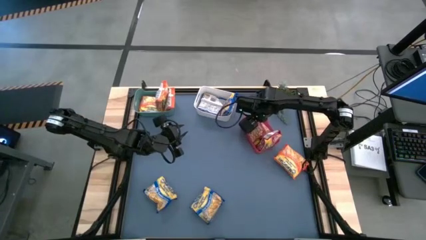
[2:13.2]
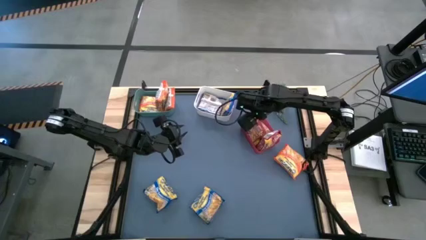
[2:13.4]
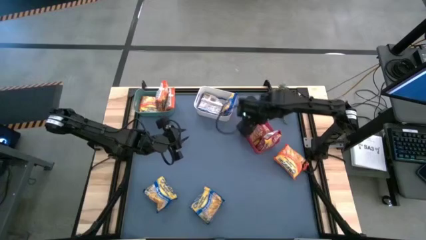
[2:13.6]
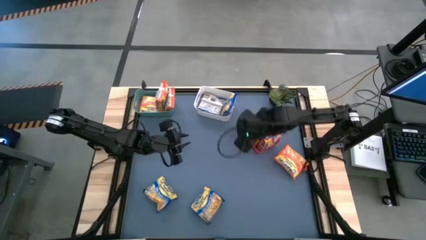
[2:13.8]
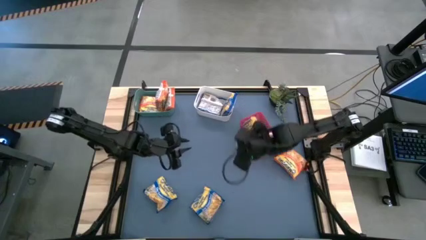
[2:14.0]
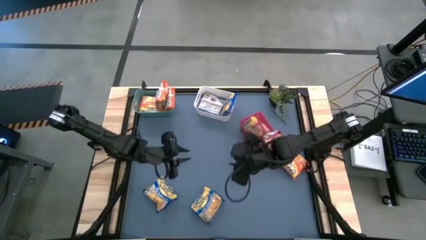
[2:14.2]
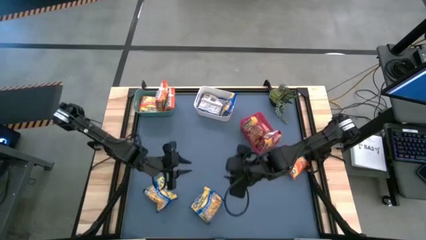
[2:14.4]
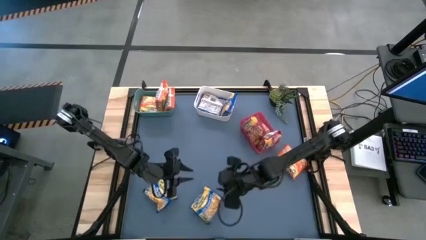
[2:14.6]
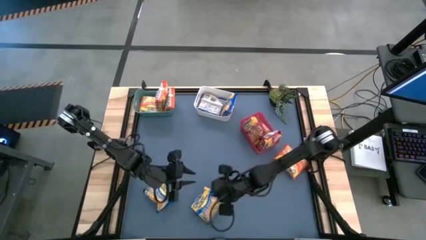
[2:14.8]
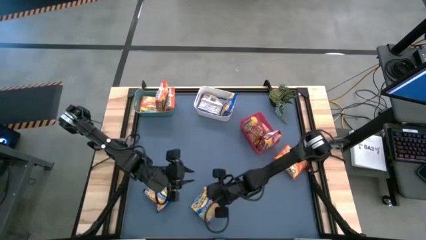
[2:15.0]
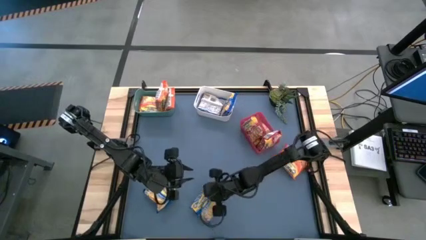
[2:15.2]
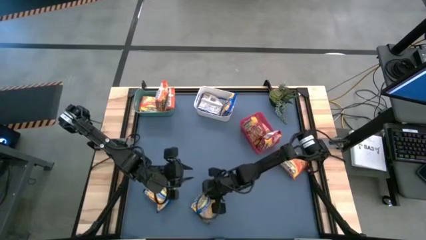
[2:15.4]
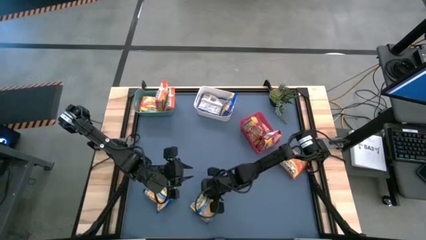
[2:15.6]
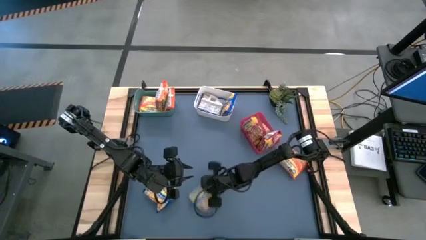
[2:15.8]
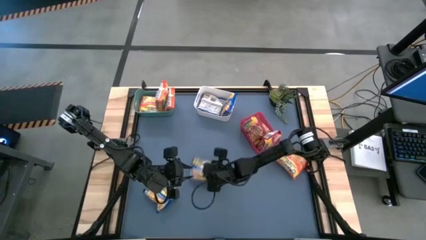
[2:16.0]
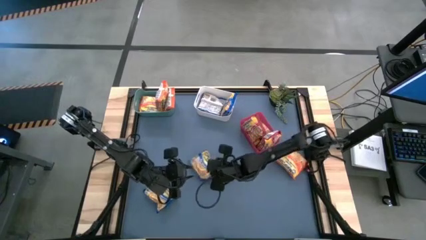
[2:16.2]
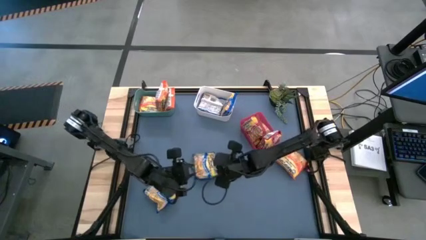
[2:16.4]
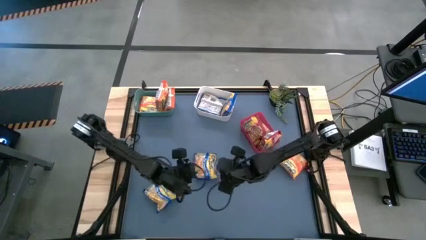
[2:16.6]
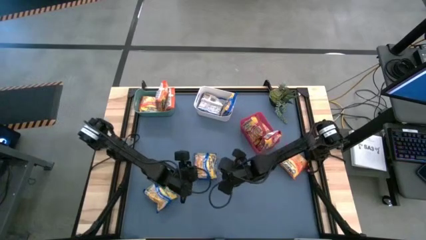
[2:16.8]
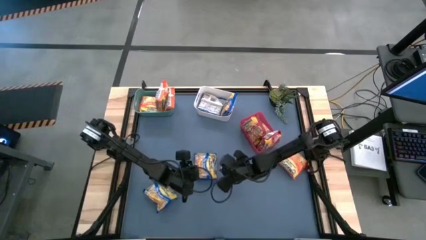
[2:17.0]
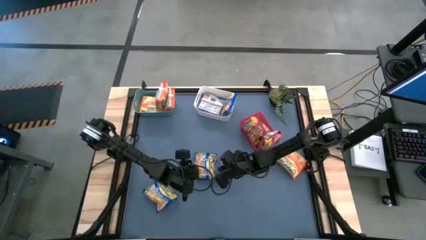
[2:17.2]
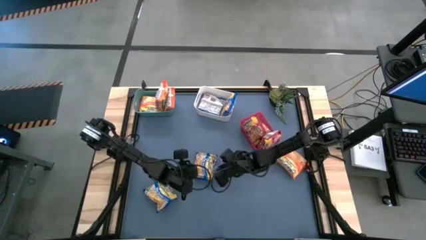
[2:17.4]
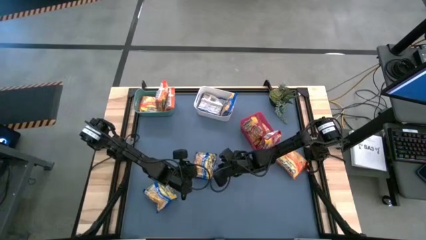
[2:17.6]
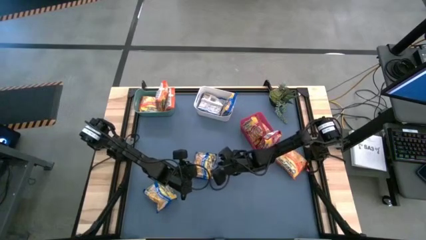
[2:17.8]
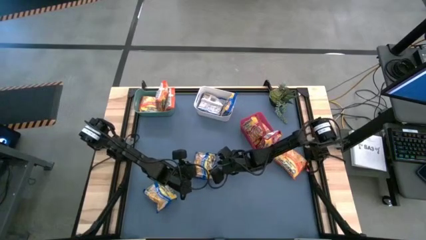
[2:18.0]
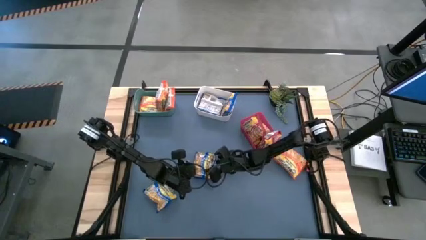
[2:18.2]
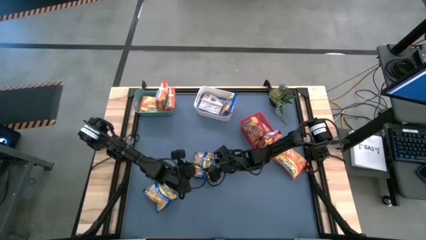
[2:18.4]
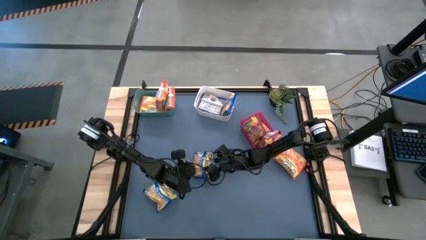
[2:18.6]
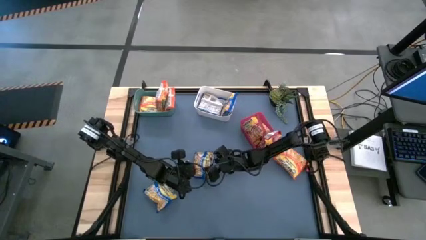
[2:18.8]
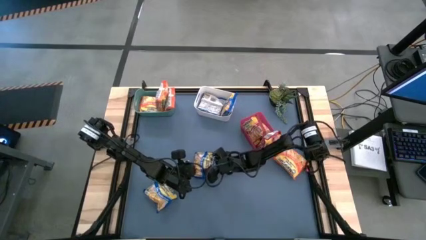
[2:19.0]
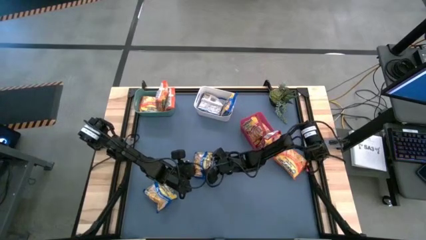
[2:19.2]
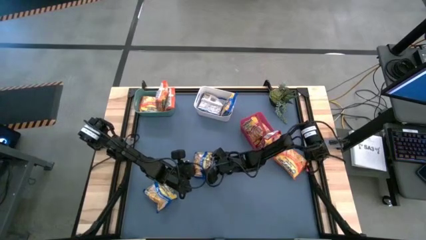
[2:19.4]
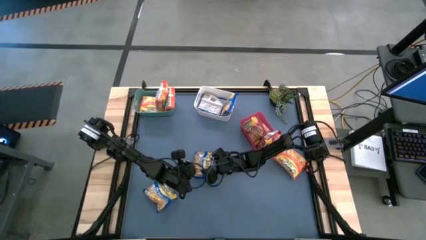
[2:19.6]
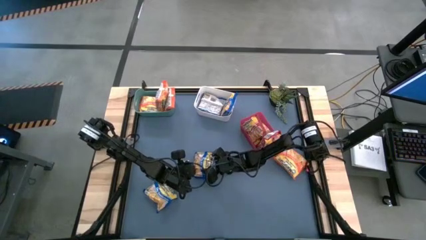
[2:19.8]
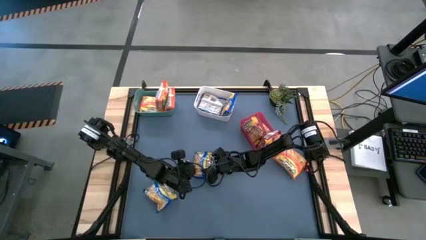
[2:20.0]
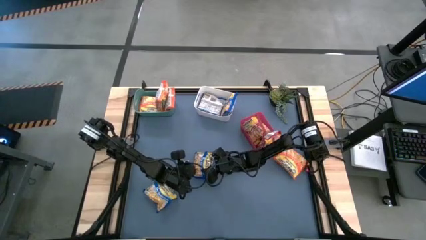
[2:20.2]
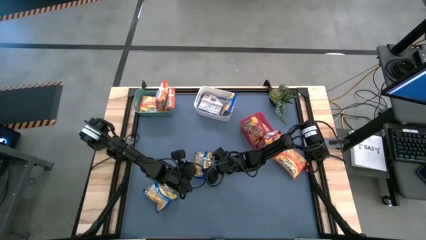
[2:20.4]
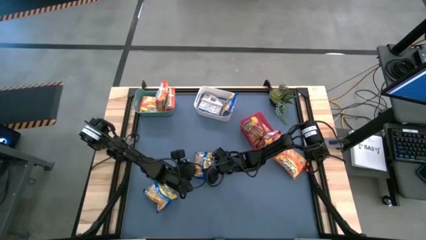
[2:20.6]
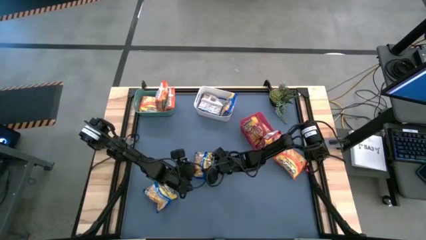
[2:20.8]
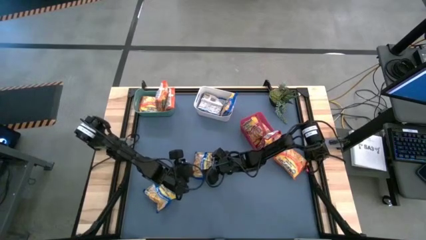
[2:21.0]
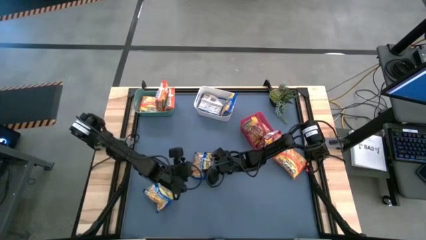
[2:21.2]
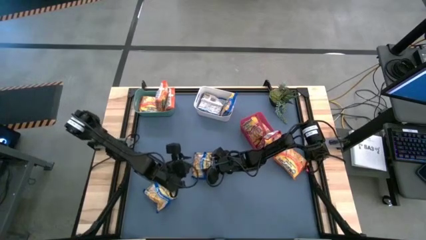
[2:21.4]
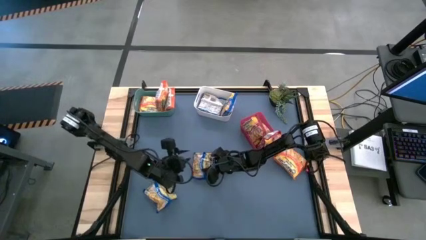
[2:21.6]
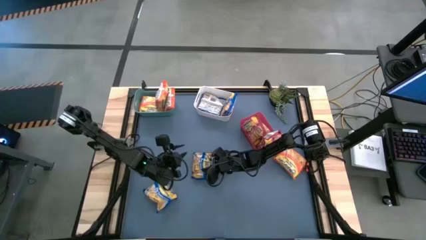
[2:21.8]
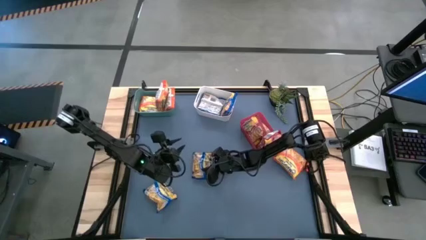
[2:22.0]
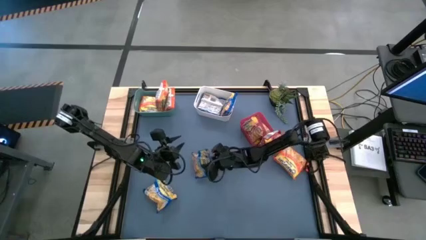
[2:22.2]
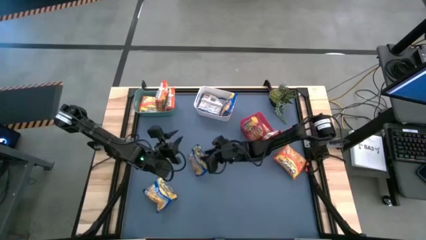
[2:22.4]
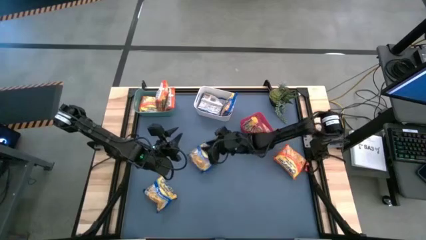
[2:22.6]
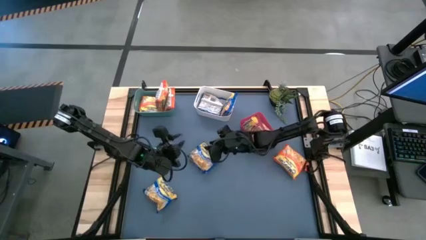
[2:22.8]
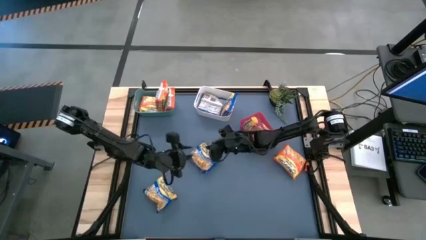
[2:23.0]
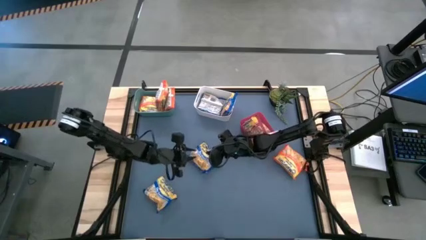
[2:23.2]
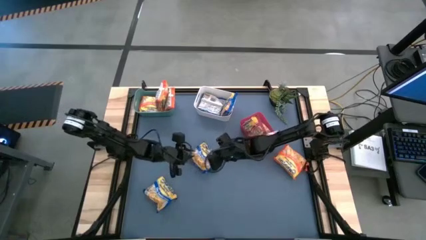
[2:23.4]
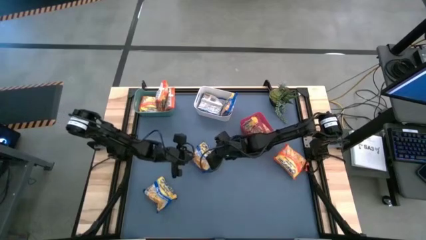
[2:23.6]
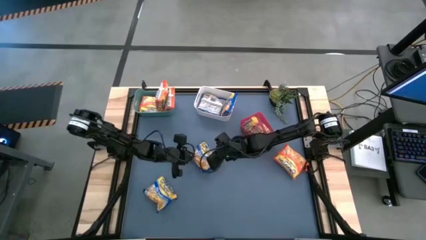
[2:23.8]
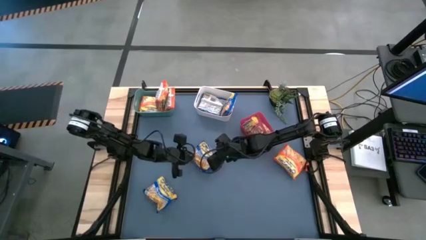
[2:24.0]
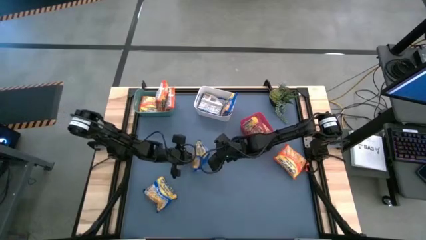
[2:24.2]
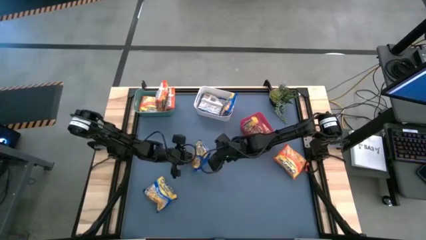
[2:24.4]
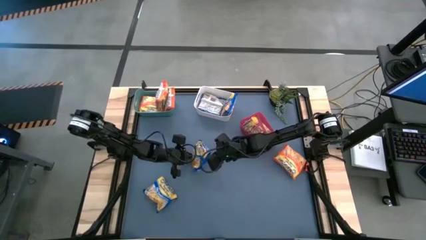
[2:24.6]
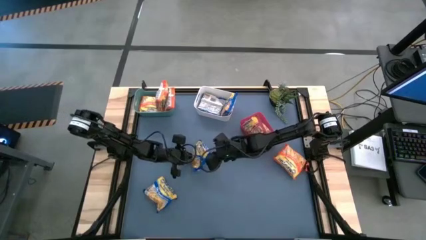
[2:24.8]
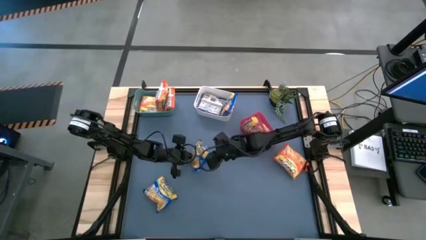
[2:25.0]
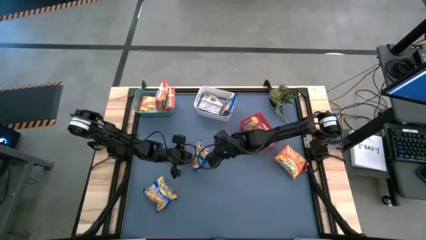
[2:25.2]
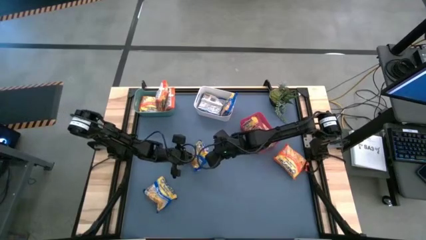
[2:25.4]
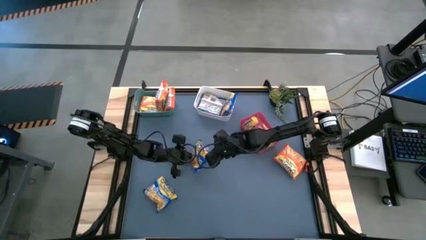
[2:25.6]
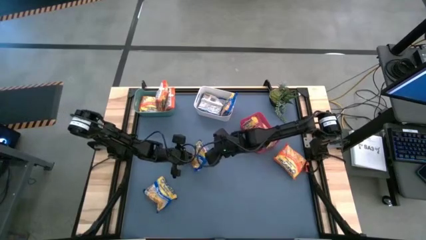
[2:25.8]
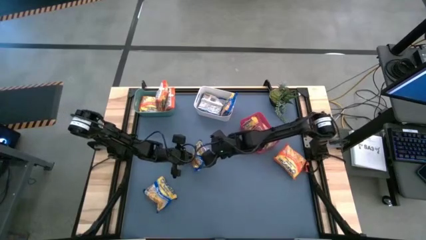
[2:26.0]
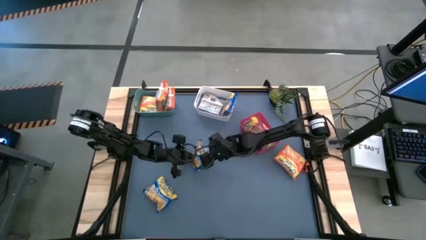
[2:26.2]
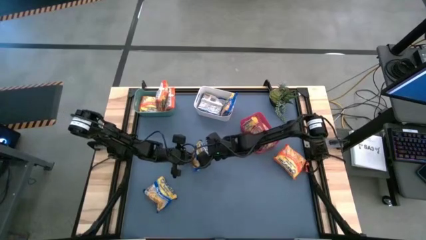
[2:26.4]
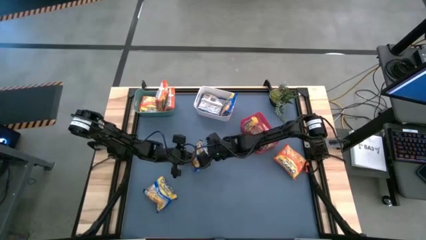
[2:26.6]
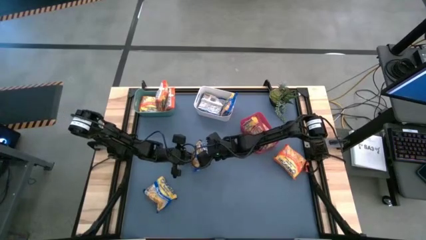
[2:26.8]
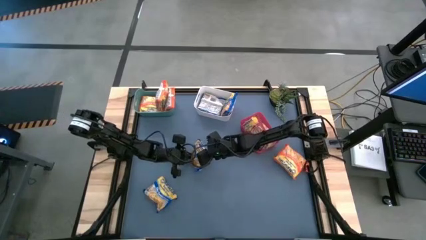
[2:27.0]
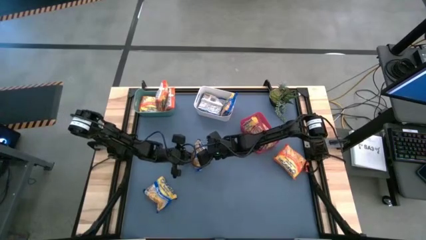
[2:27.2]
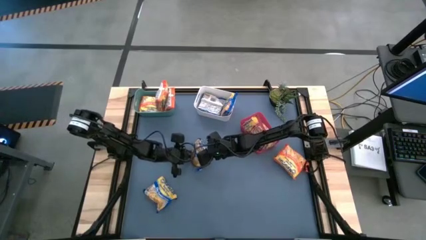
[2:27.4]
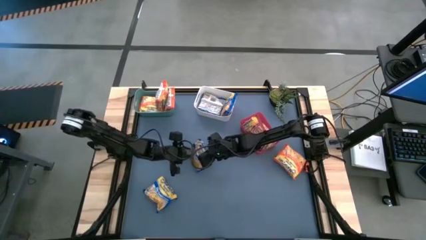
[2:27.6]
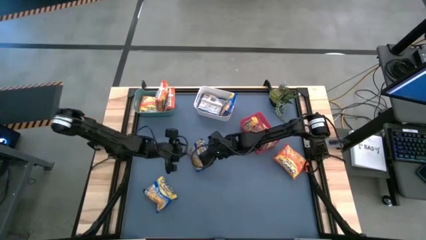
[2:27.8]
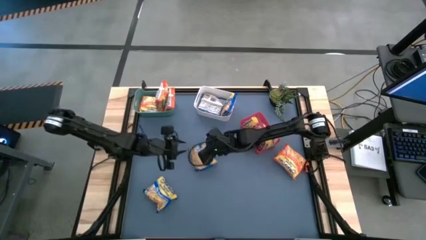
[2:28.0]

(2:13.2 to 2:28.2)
Task: Sort Maruchan noodles
Put the blue noodle pack into the white bin

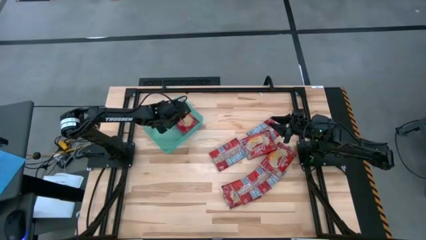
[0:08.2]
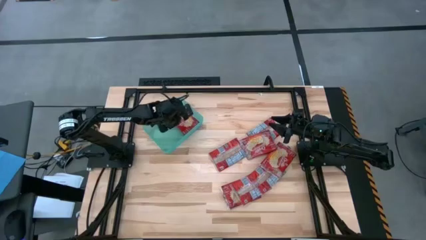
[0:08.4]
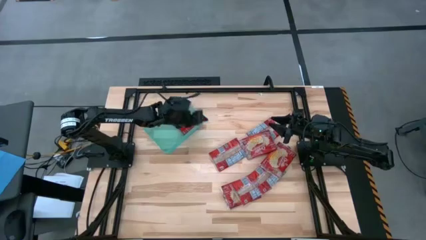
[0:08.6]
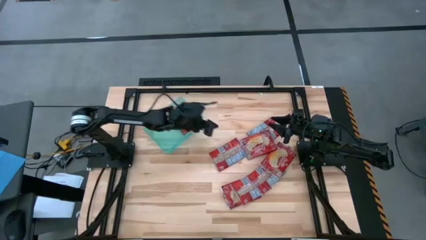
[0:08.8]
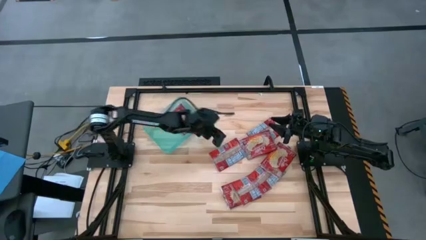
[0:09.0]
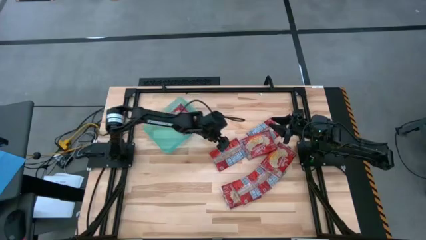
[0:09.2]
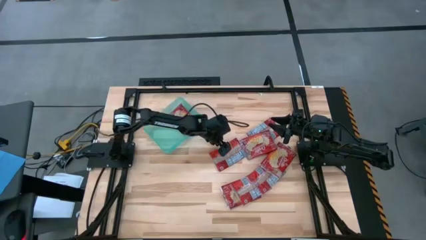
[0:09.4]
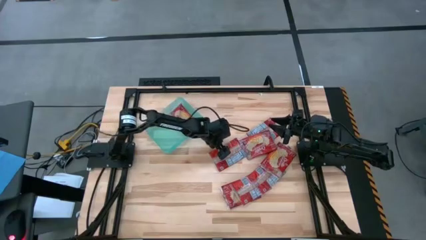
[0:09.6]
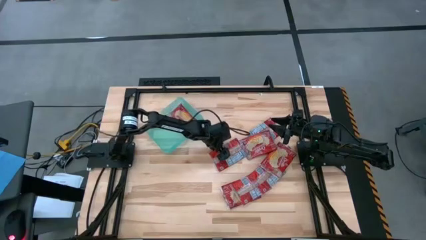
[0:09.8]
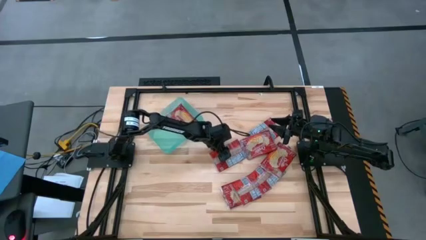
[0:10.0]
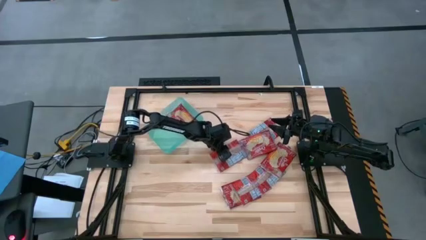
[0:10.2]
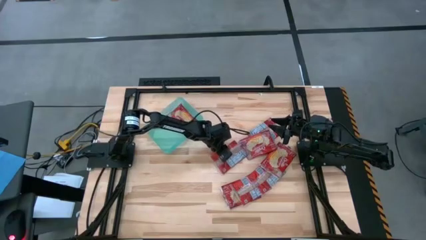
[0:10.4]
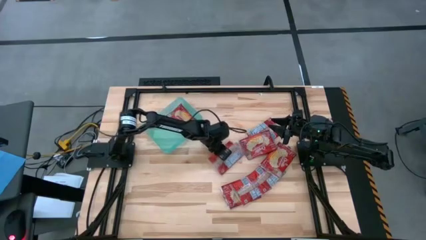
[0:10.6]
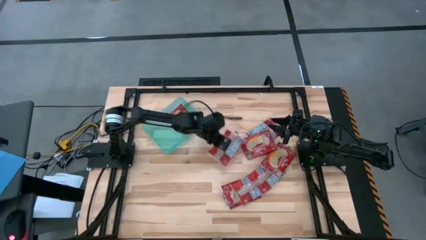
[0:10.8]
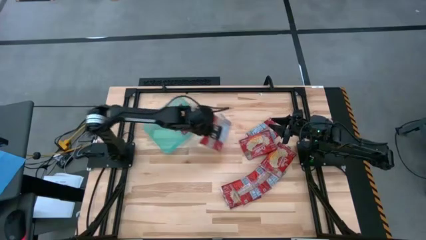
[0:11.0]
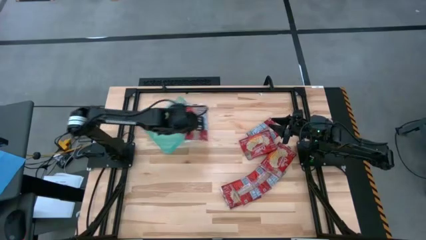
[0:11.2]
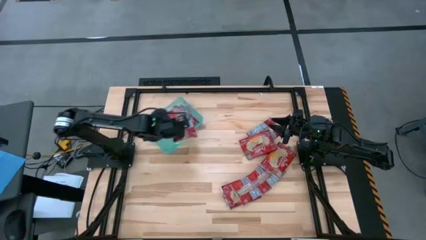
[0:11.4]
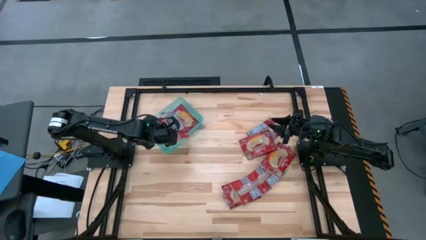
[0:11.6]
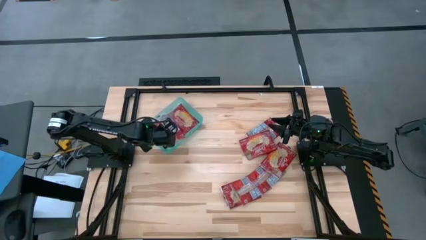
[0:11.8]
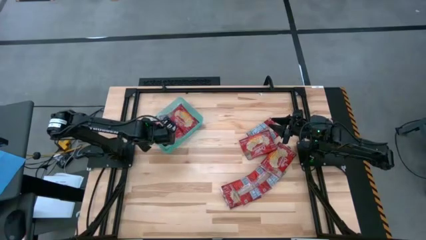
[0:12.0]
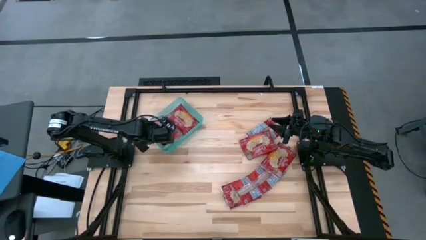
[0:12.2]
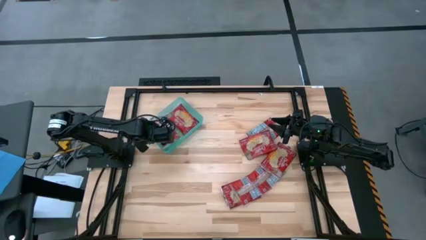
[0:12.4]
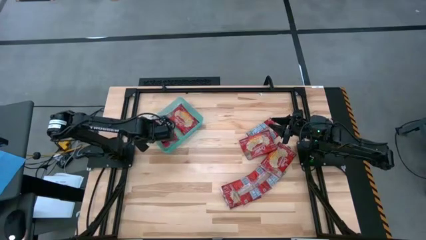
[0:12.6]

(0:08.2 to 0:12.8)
Task: Sort popcorn bags into baskets
Put the red popcorn bag into the blue bin
